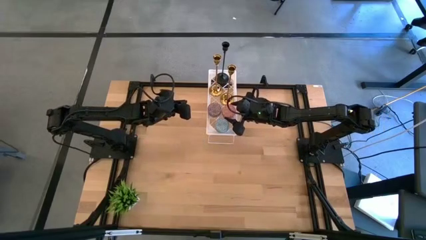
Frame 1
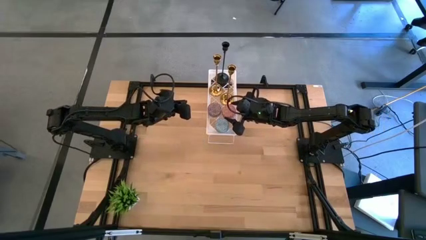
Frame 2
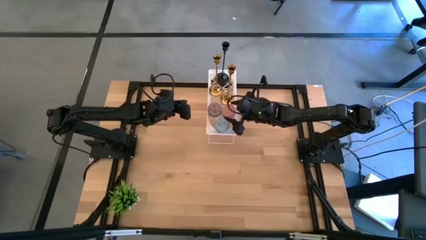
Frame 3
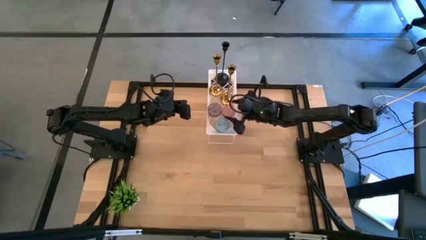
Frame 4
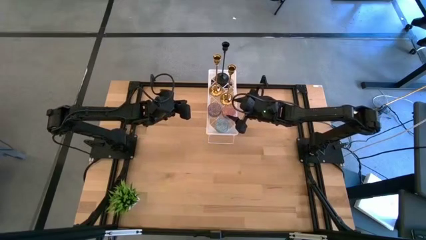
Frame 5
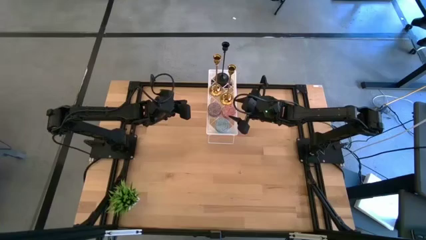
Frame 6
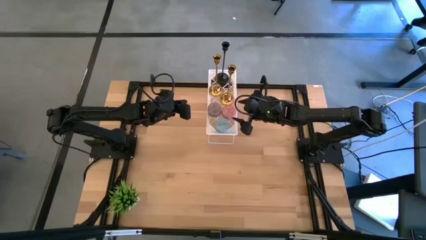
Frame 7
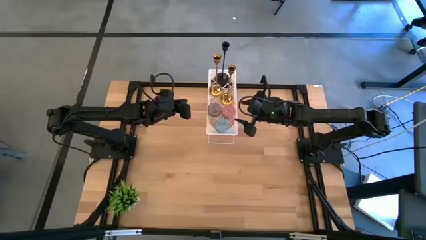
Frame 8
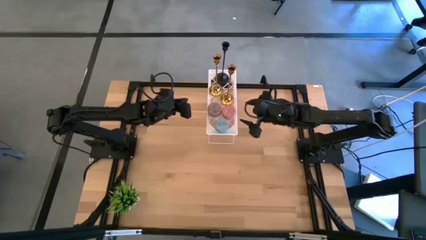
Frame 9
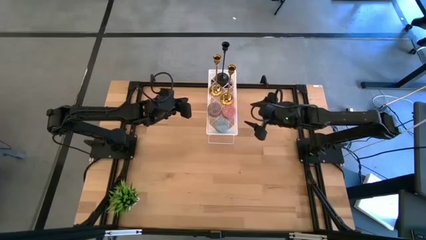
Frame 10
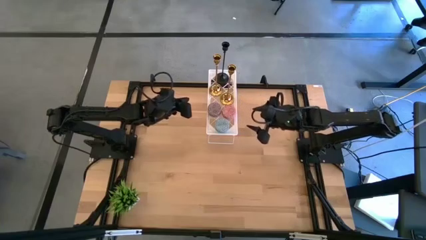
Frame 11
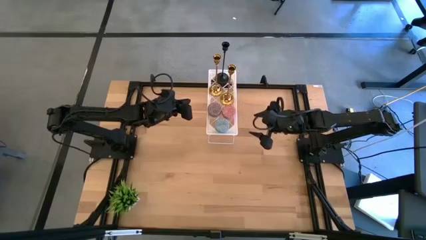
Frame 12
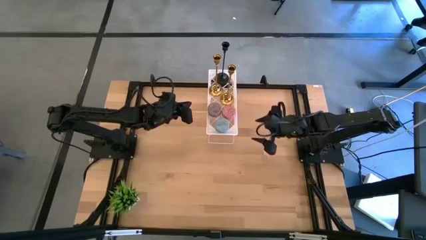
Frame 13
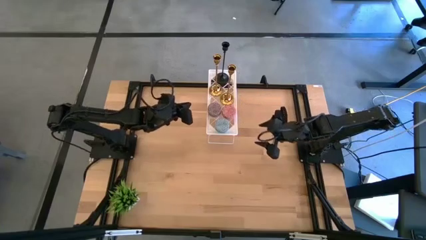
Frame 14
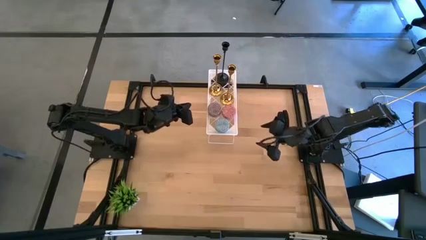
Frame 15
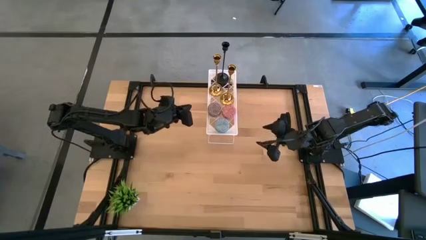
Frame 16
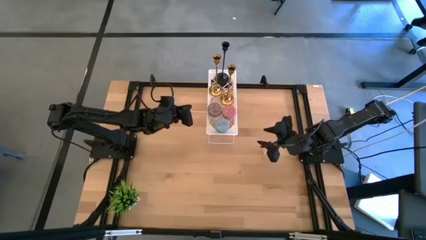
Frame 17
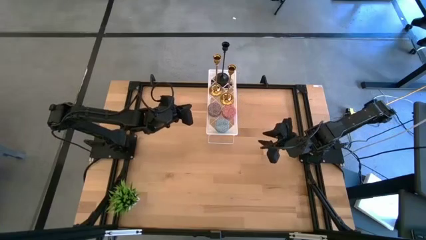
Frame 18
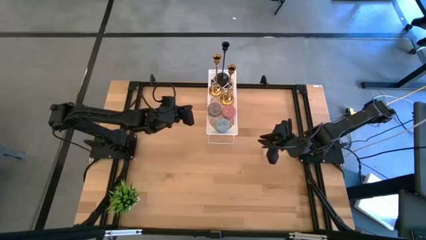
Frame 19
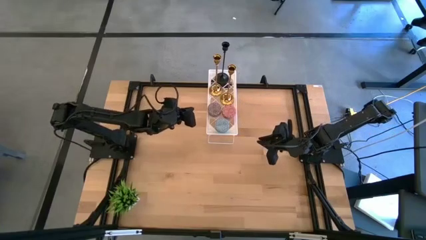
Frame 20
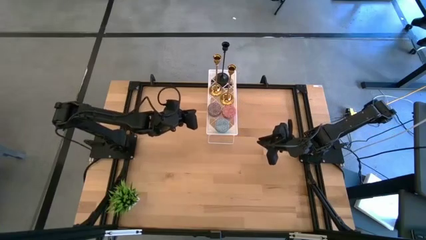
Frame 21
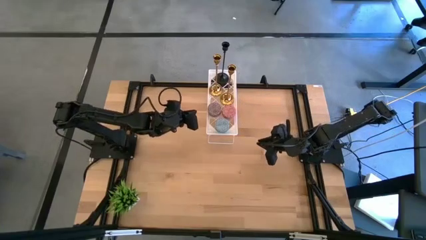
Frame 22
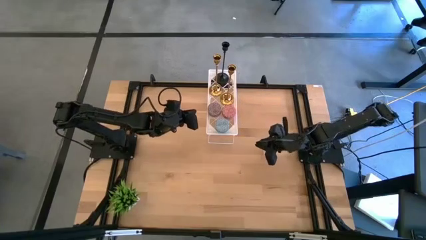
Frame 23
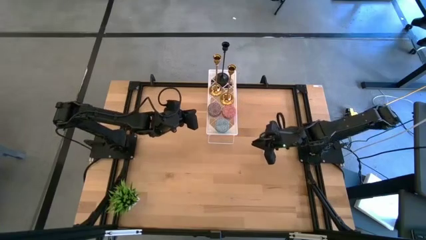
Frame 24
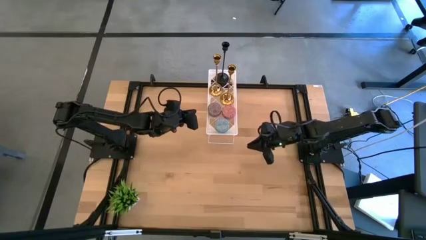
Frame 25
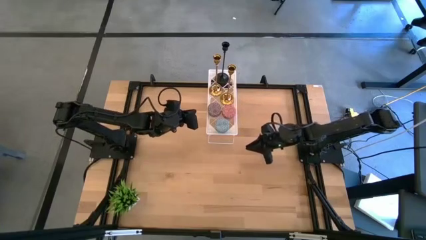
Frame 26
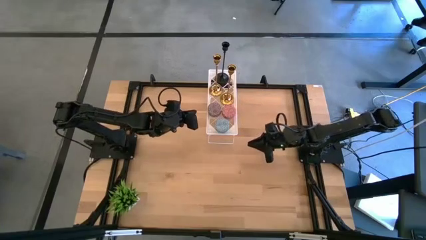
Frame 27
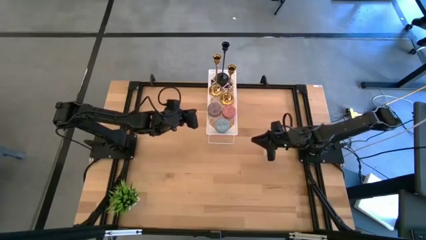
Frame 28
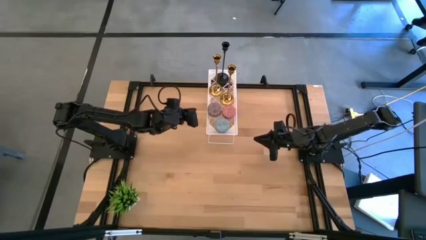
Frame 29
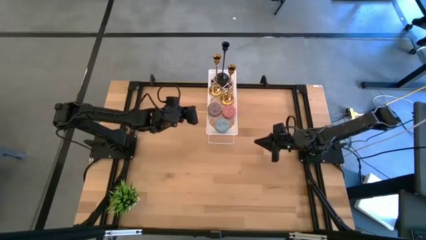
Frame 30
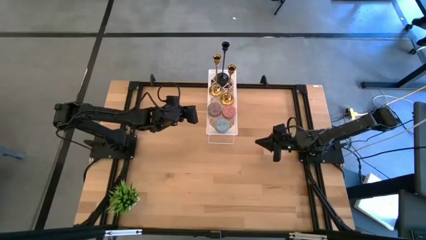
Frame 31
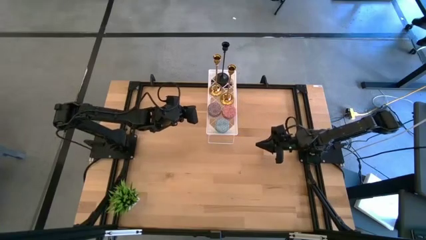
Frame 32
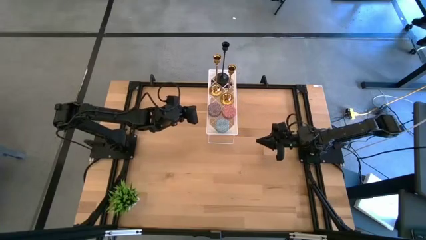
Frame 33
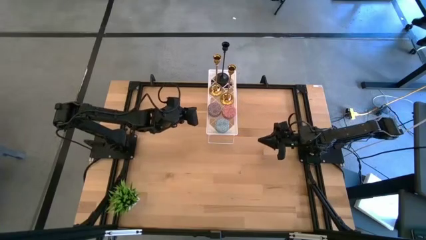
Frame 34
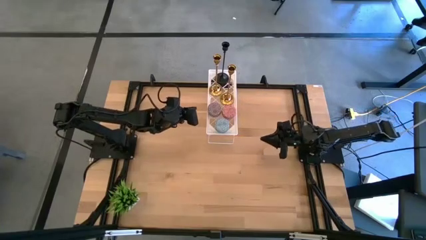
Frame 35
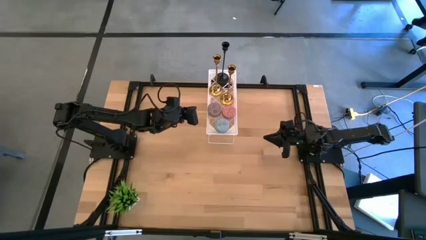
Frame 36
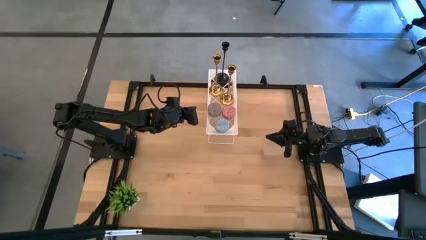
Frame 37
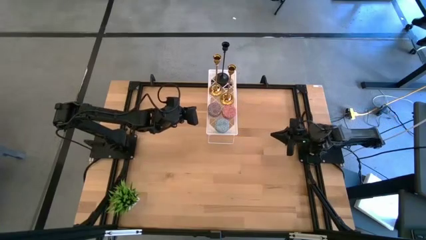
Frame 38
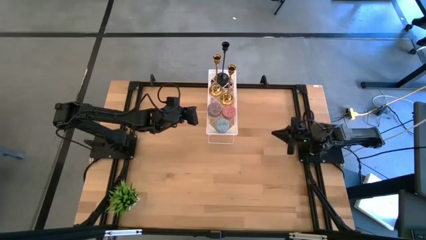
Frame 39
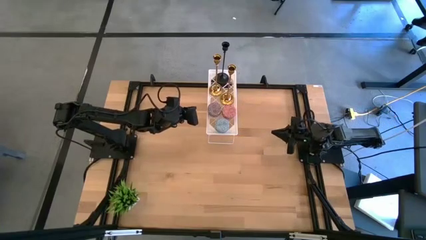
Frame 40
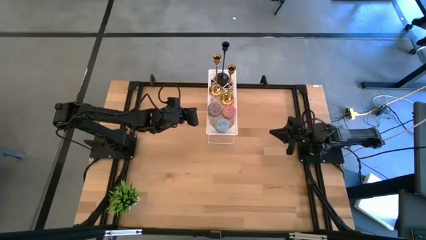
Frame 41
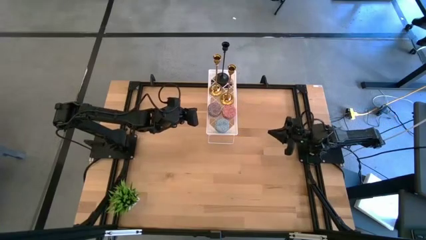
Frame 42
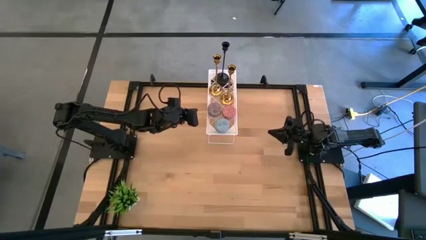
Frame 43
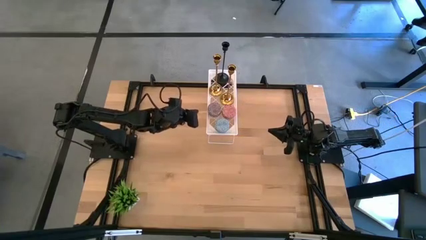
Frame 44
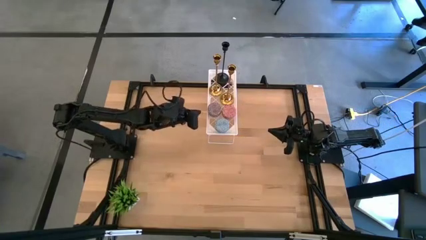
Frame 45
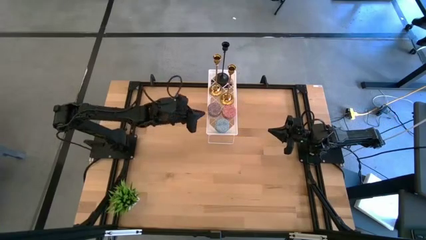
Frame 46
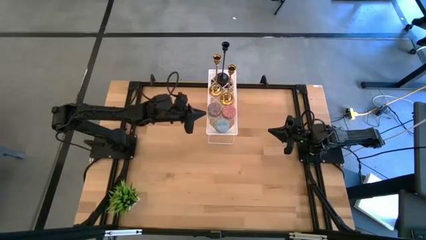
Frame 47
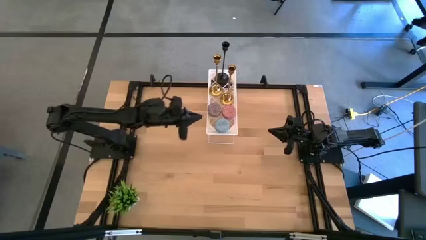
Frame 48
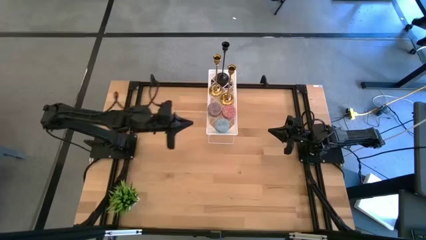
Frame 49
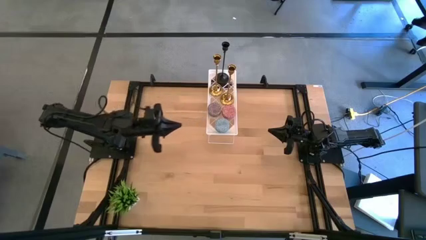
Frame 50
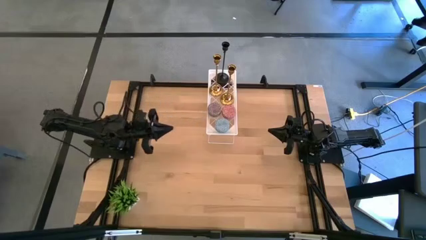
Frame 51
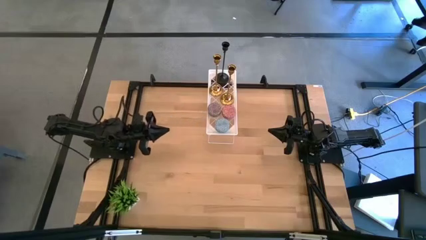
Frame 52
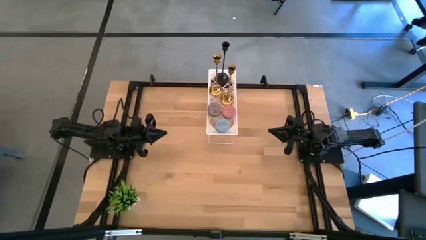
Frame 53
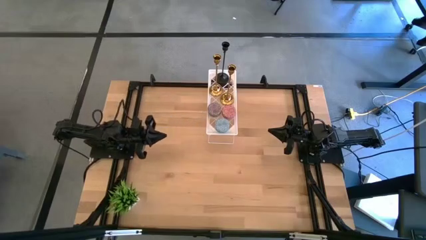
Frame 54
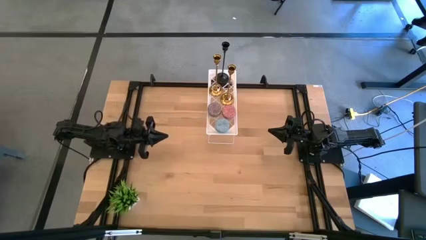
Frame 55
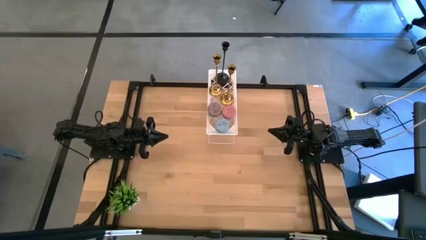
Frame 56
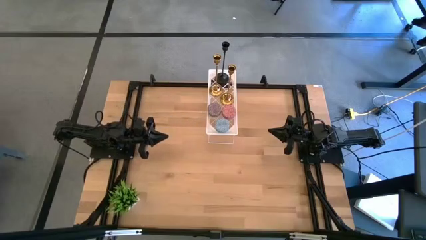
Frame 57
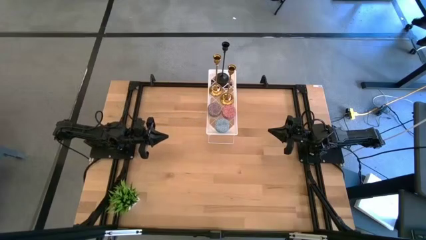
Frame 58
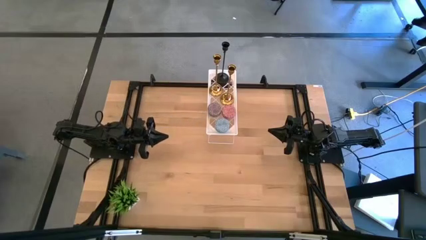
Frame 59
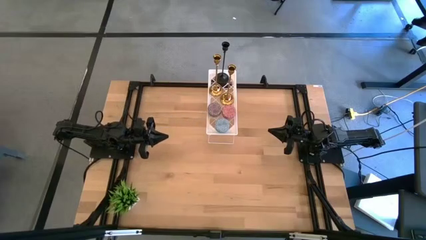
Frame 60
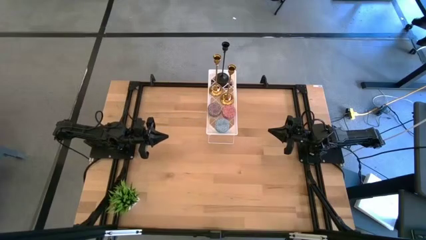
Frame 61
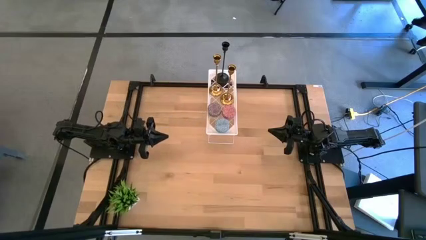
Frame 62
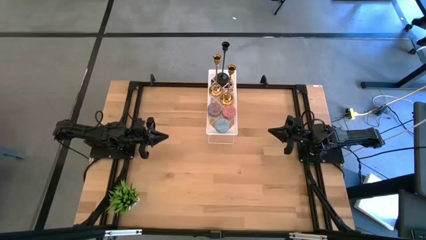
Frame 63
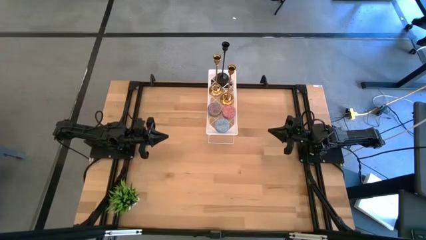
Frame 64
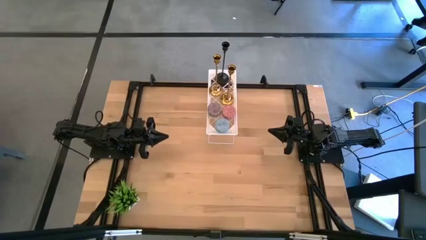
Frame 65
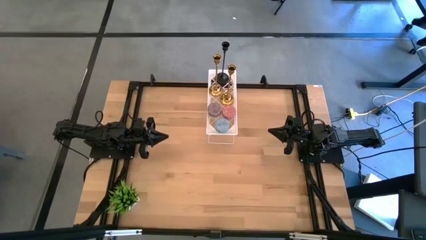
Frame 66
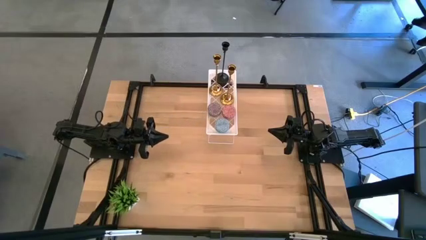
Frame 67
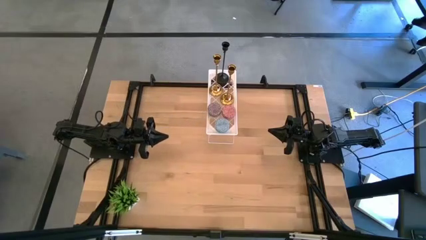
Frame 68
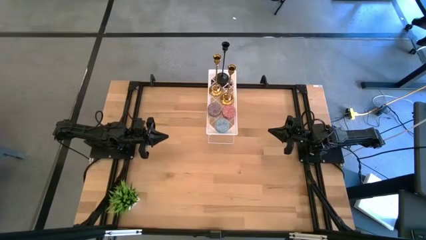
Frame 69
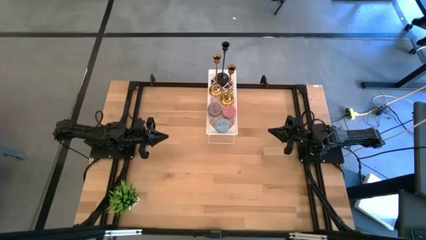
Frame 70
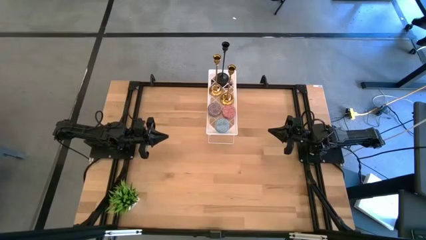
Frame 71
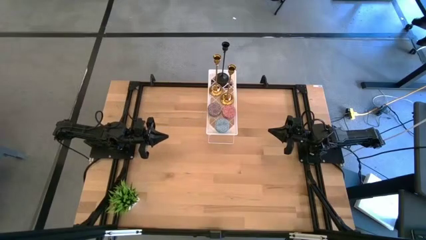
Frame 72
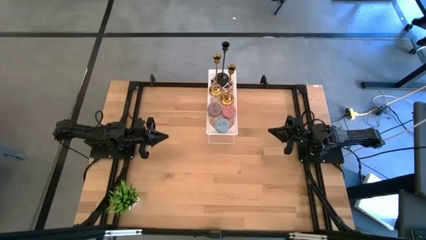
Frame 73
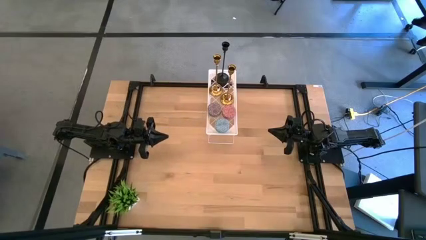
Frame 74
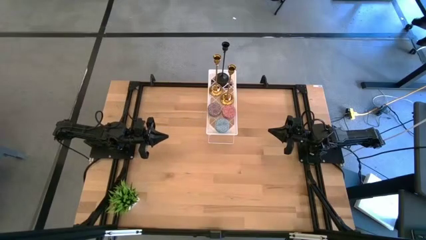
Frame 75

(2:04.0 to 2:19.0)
Task: Pick & Place candle stick holders
Return to Home Position
